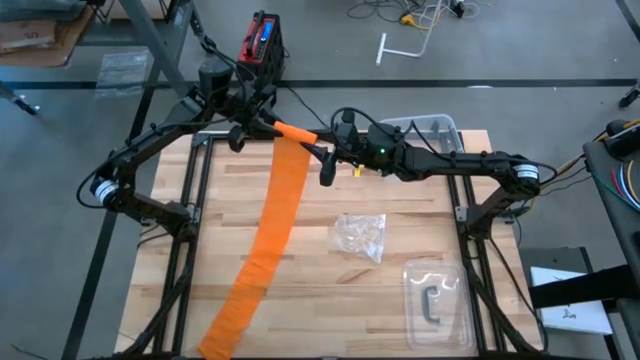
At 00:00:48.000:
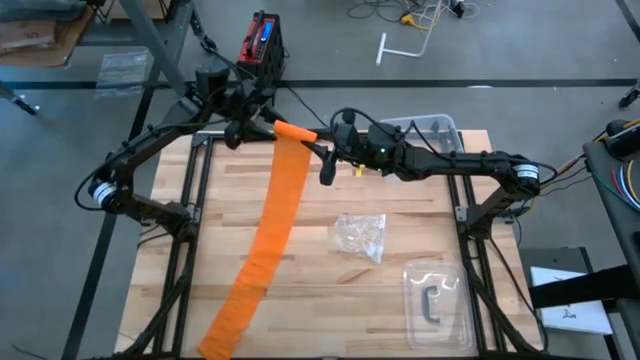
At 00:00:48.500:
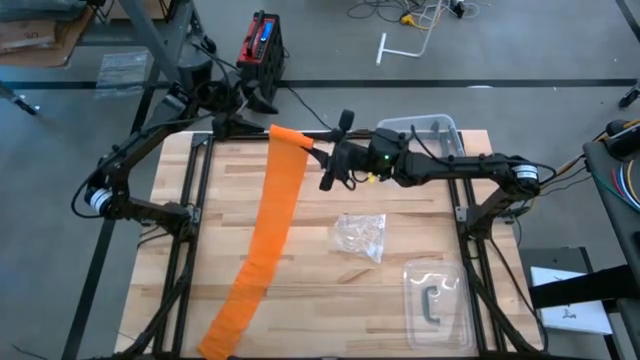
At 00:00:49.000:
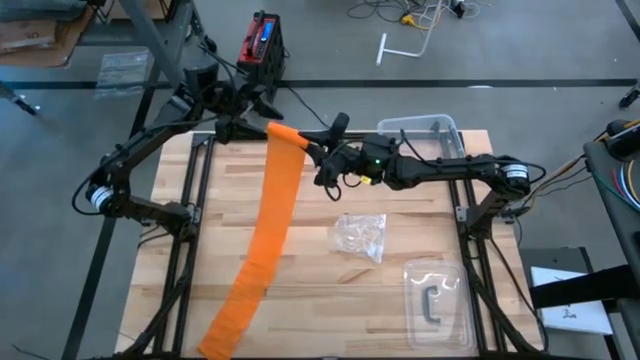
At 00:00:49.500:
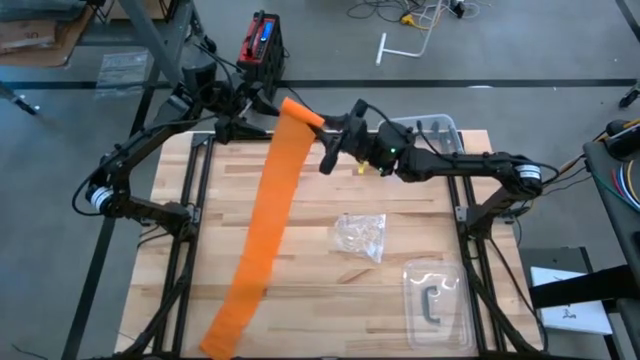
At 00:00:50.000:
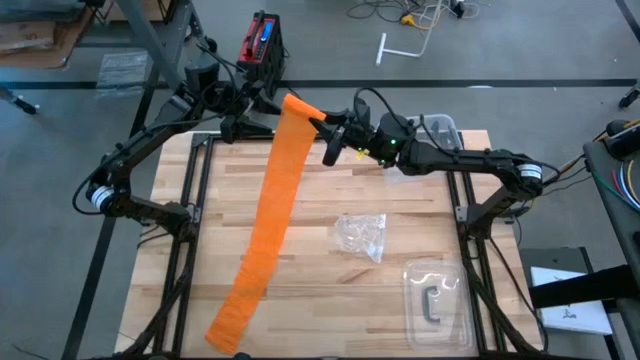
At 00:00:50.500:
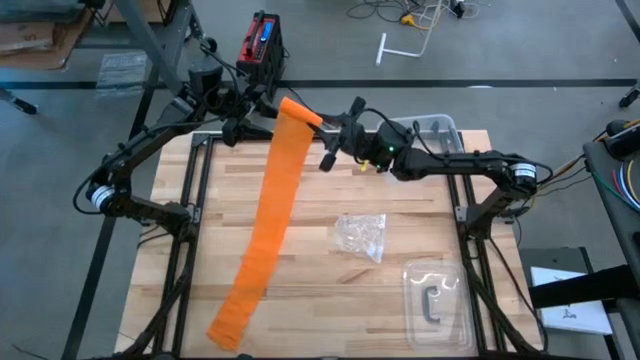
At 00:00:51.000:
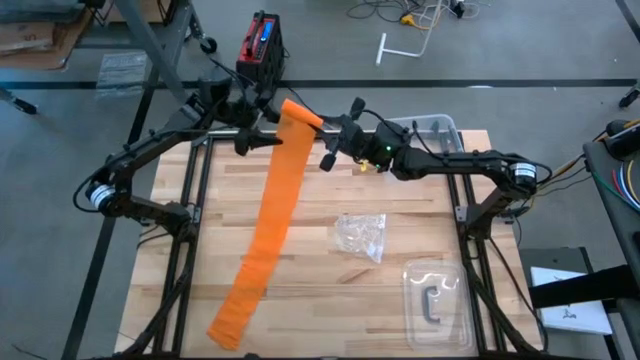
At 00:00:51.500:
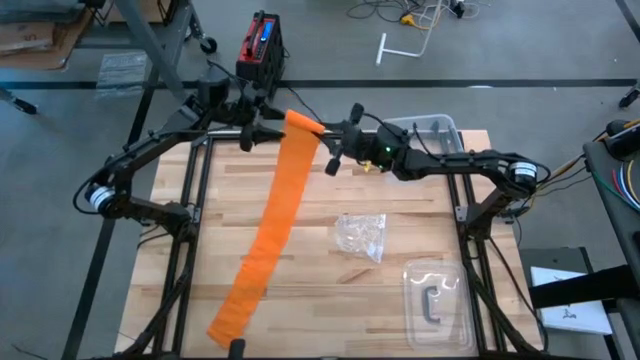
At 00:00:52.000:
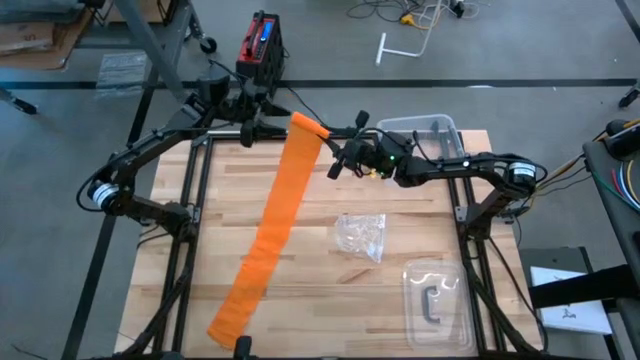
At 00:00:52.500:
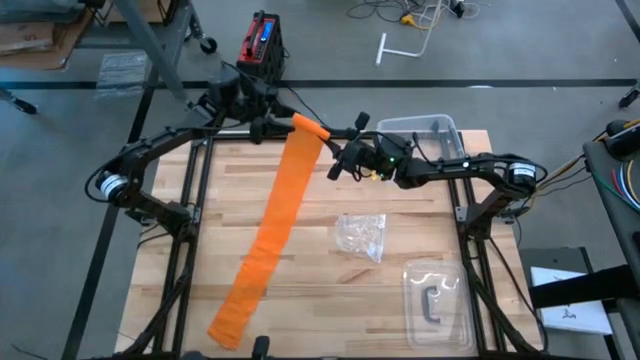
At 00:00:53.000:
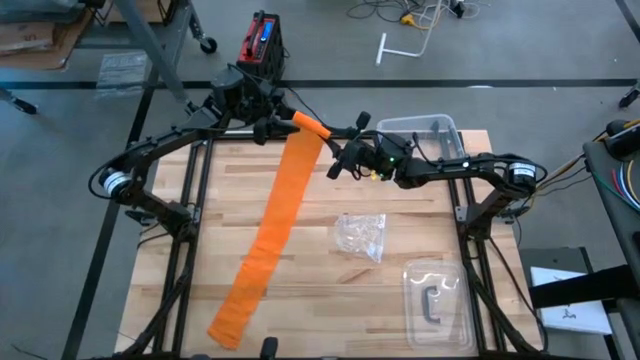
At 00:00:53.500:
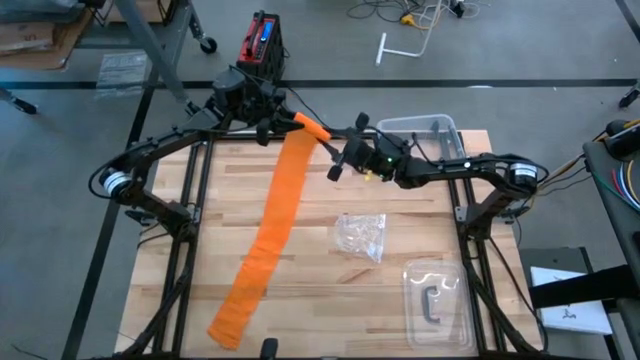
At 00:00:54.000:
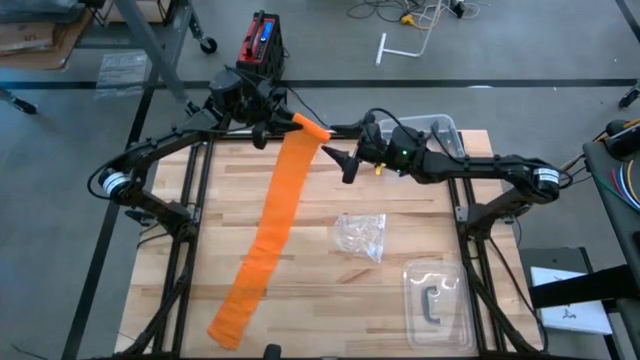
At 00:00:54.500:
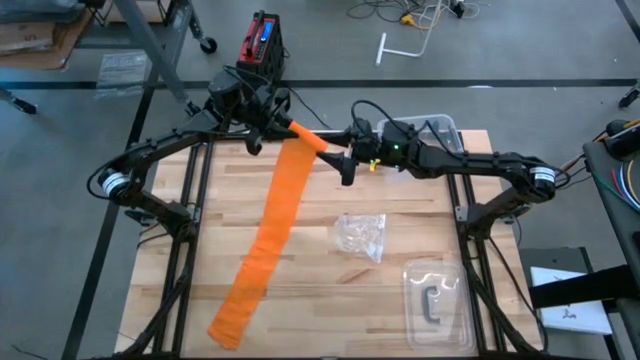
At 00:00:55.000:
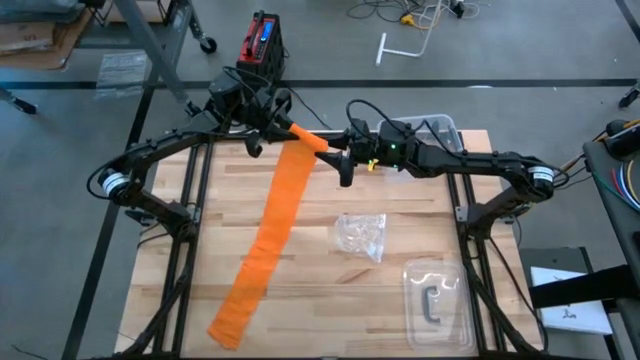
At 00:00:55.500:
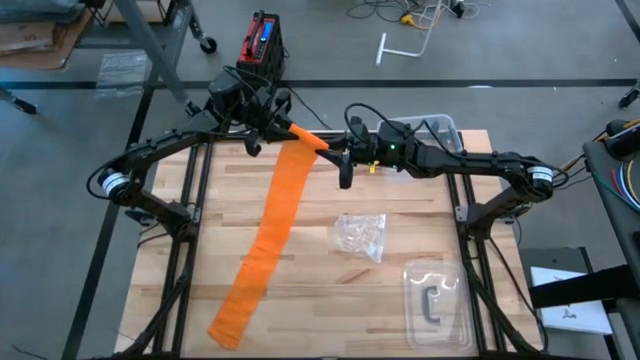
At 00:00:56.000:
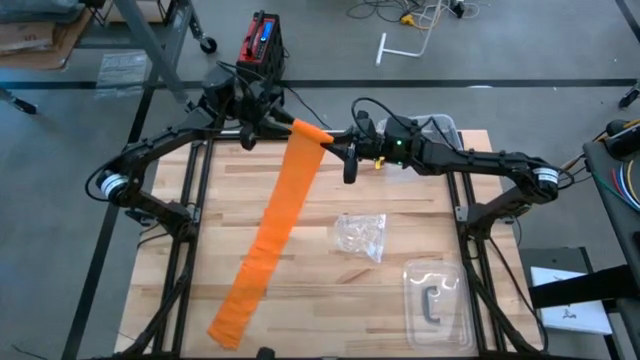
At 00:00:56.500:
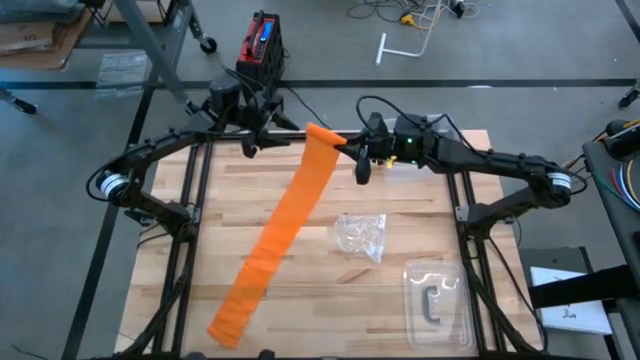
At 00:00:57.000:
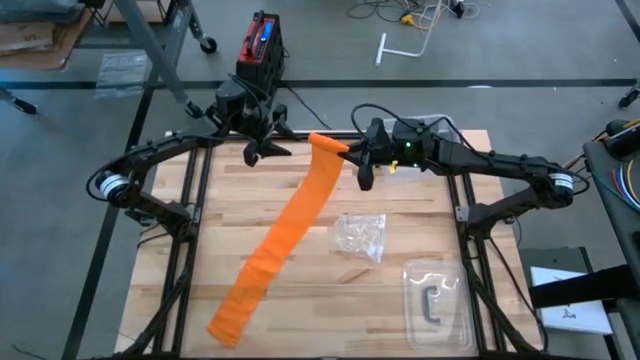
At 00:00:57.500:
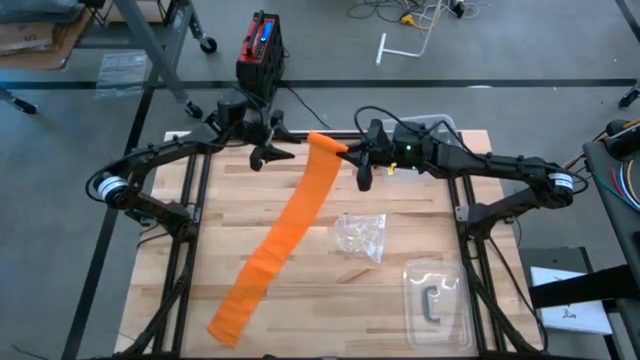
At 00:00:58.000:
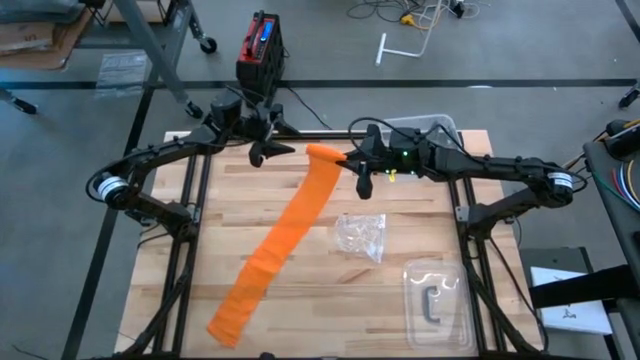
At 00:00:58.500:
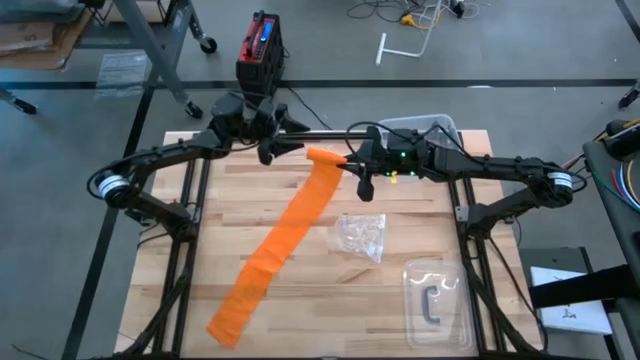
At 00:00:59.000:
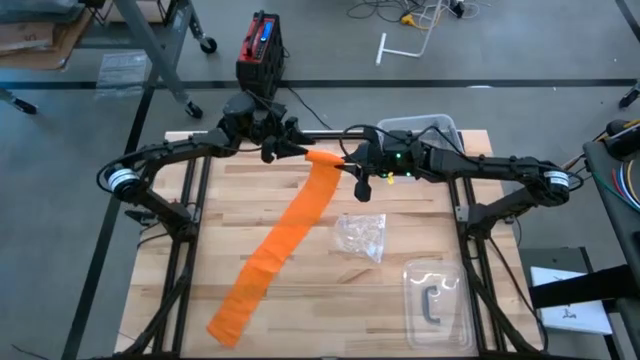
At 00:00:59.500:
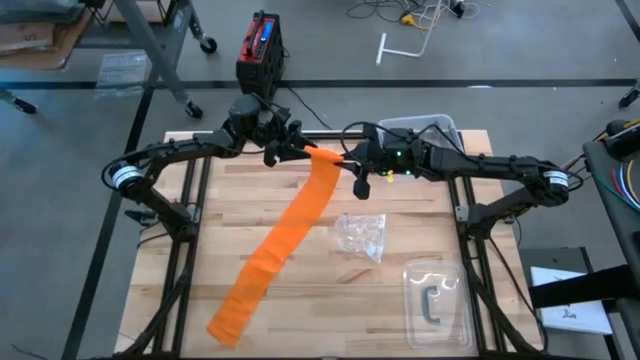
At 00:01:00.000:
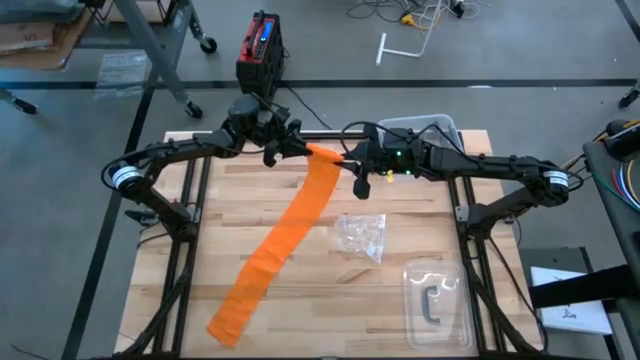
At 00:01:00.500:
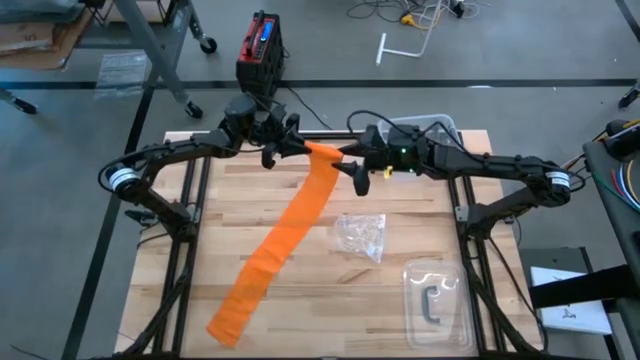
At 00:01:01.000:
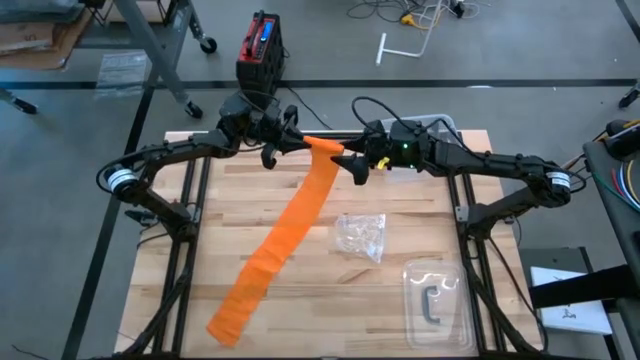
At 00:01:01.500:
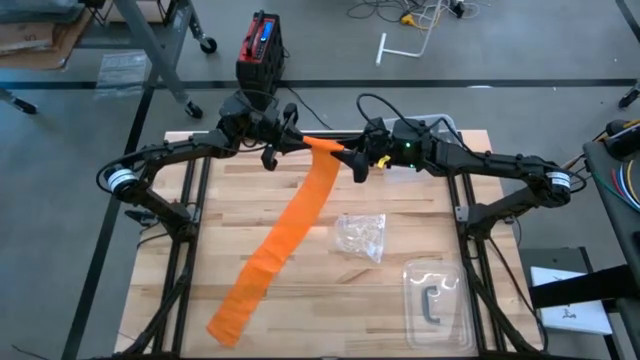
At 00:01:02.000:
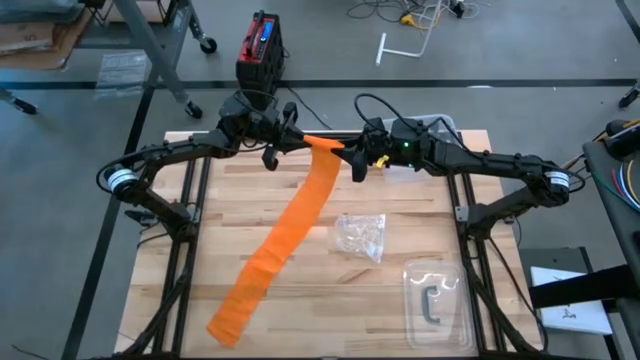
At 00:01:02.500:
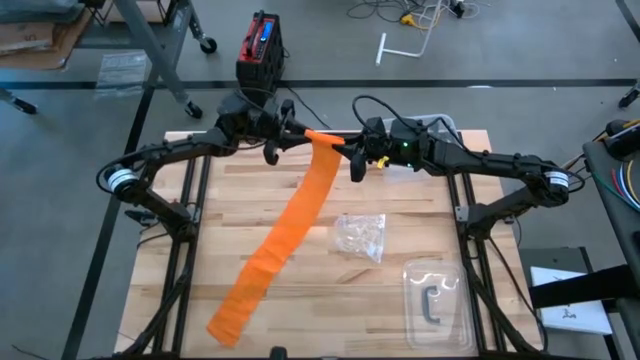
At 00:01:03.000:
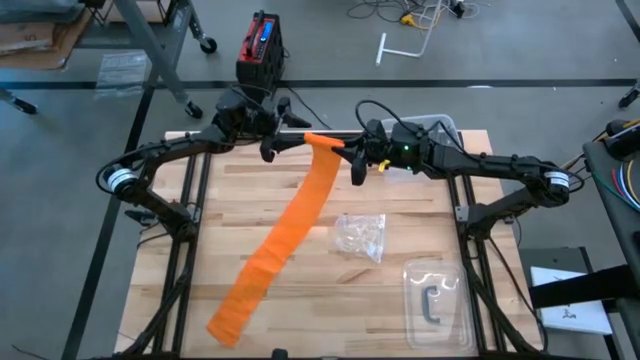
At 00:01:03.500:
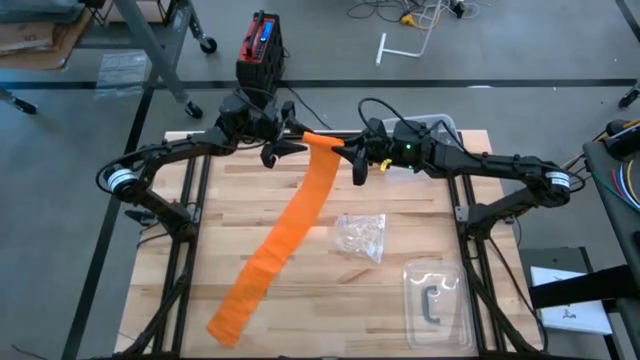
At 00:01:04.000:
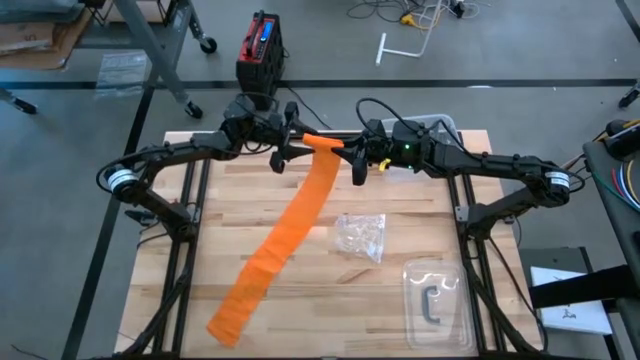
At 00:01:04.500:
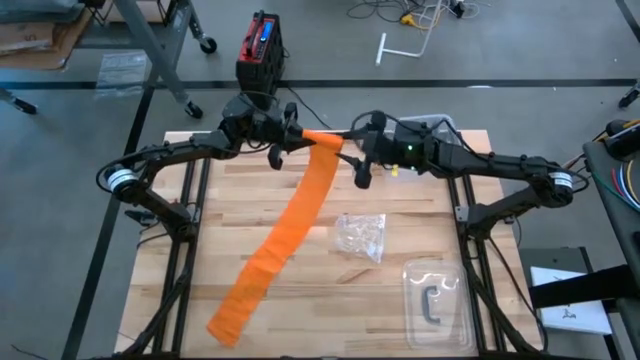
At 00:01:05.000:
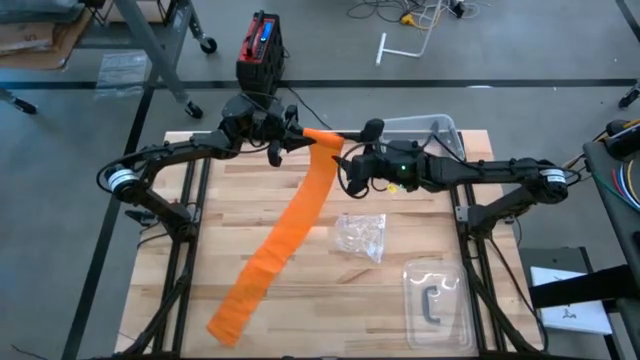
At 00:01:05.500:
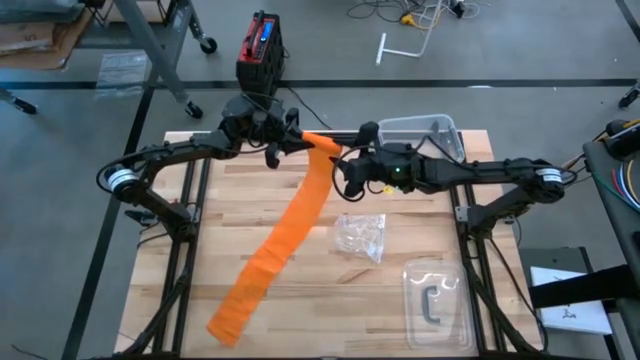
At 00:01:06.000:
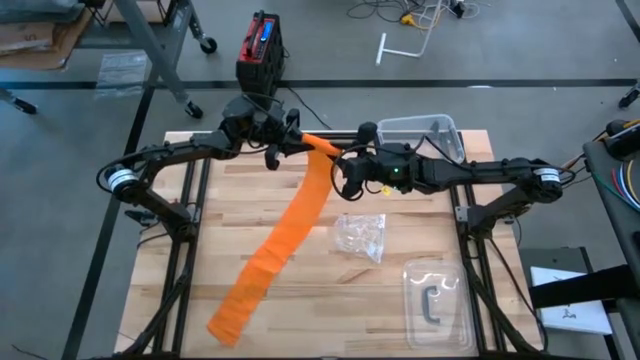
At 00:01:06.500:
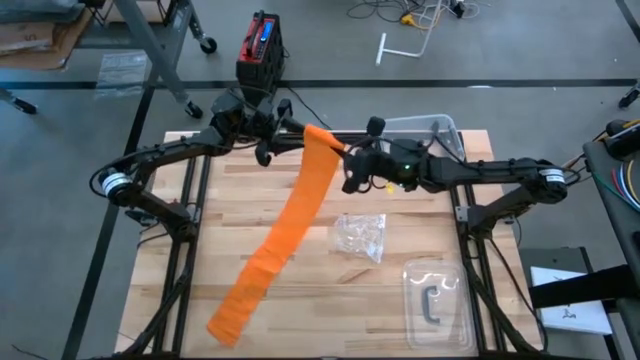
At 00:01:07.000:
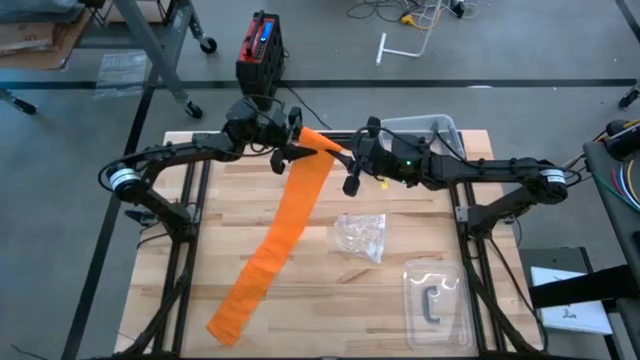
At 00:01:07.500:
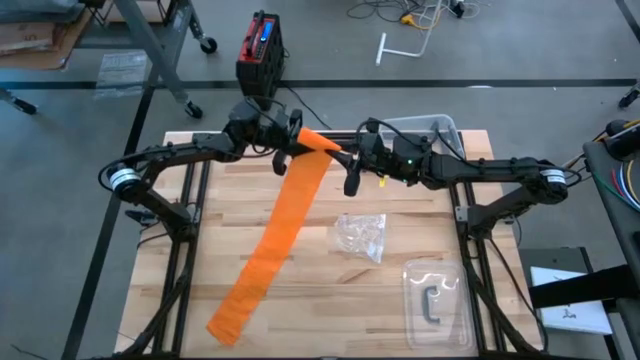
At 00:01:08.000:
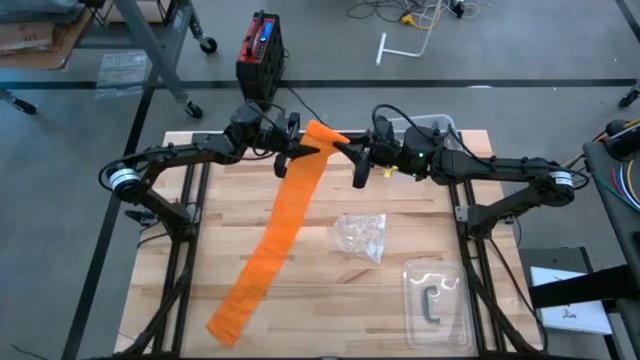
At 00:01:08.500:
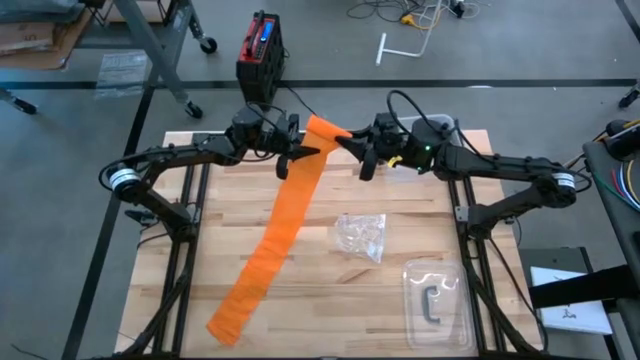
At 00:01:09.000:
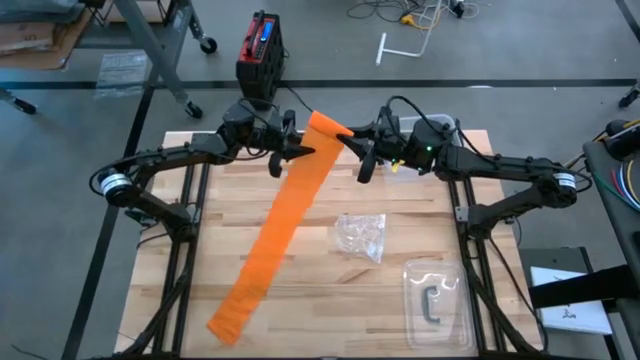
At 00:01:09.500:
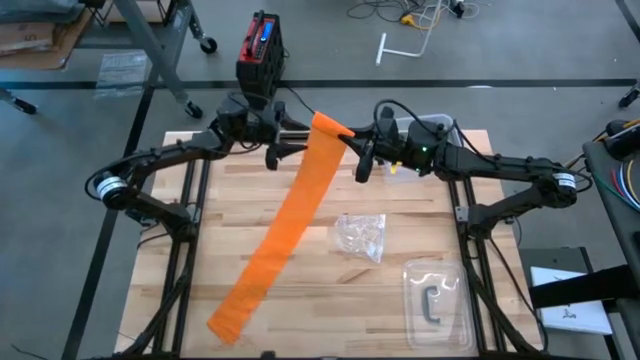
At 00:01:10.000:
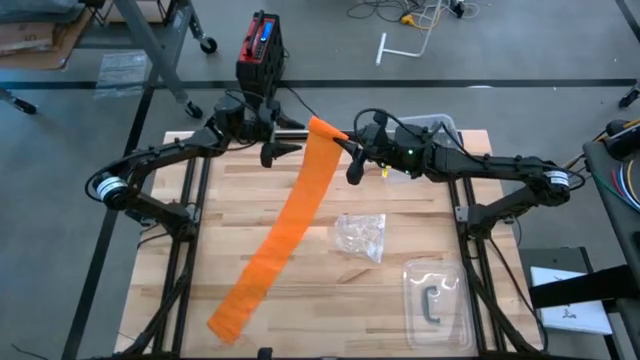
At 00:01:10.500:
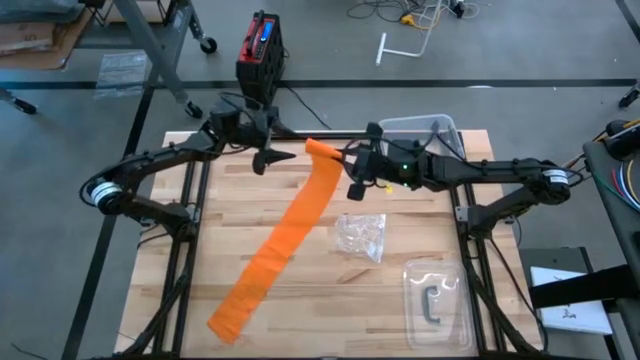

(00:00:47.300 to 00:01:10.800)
Task: Roll bandage
Roll the orange bandage
